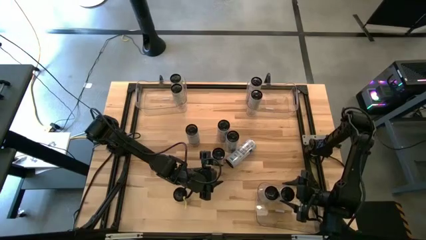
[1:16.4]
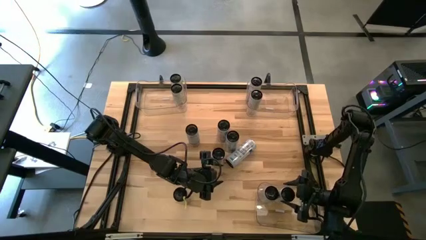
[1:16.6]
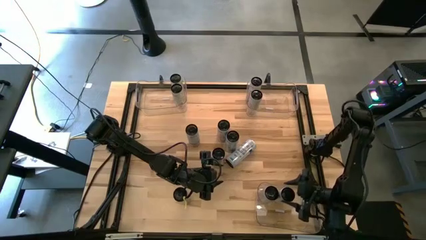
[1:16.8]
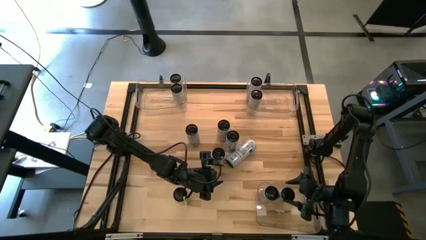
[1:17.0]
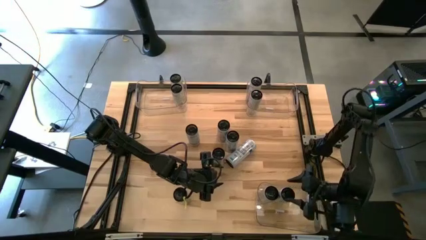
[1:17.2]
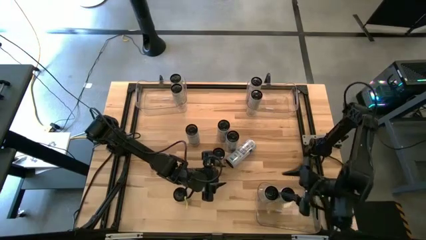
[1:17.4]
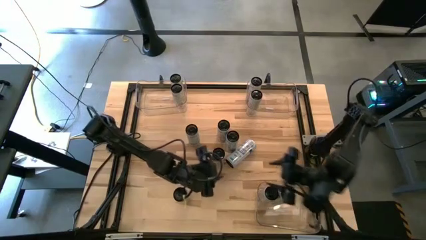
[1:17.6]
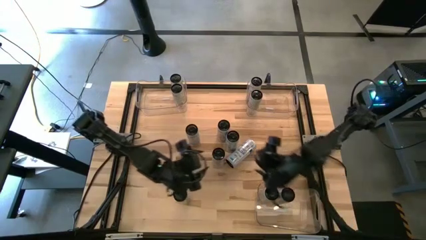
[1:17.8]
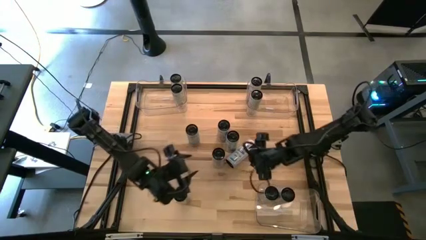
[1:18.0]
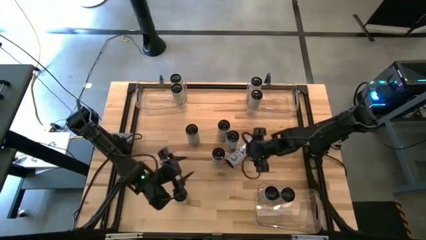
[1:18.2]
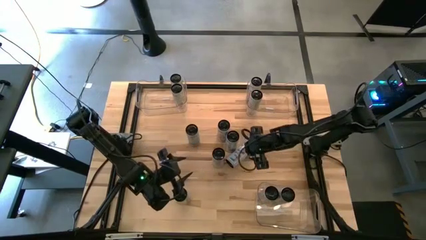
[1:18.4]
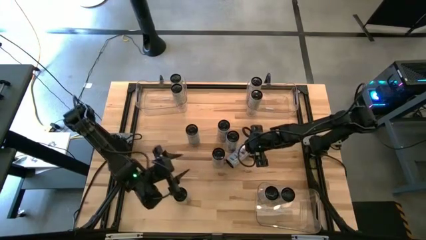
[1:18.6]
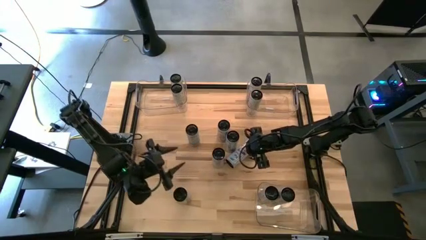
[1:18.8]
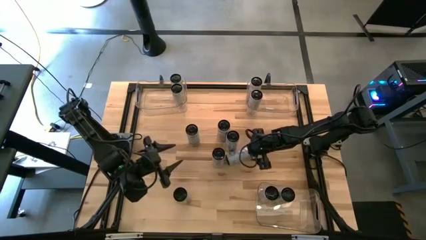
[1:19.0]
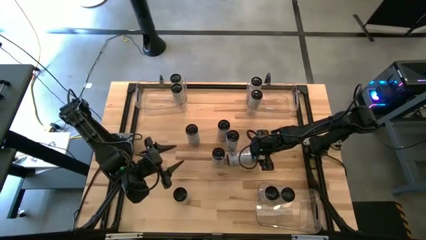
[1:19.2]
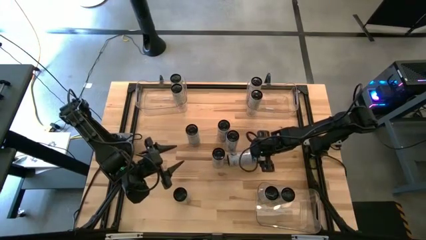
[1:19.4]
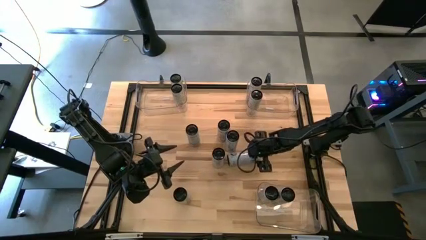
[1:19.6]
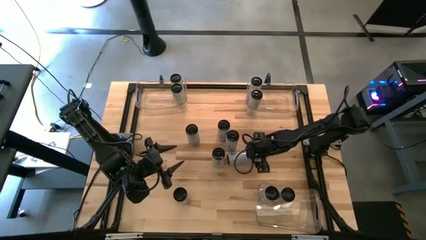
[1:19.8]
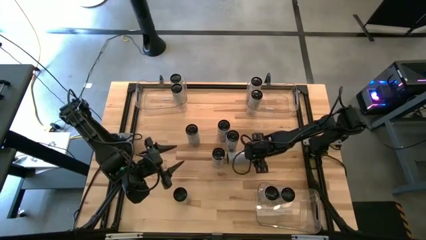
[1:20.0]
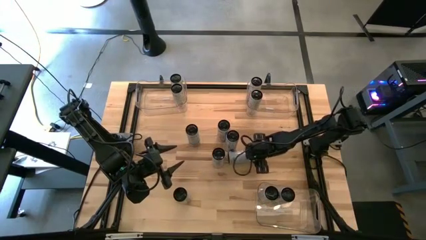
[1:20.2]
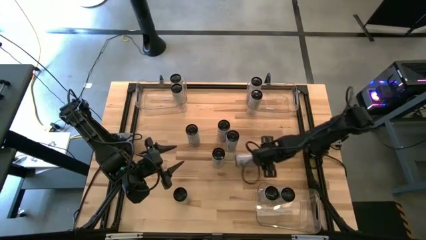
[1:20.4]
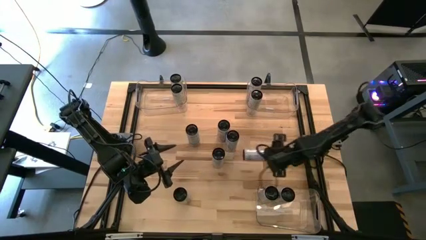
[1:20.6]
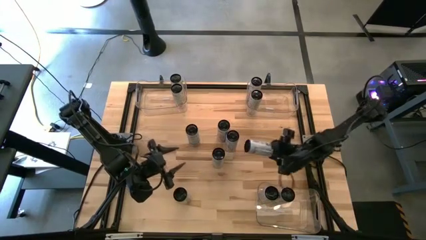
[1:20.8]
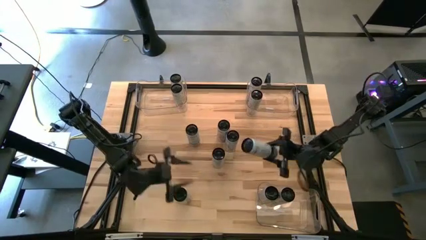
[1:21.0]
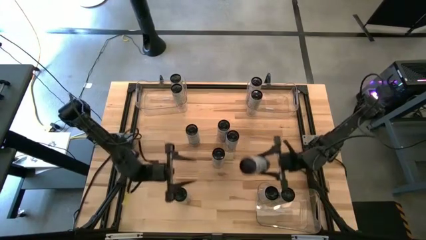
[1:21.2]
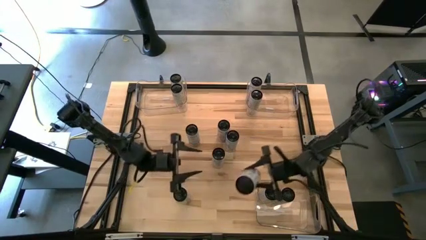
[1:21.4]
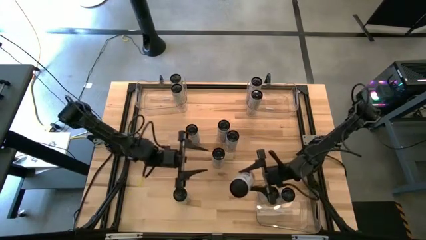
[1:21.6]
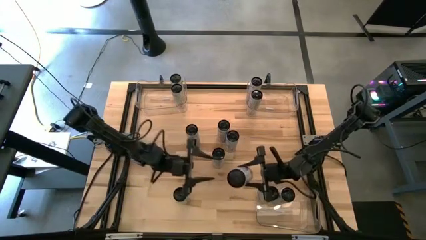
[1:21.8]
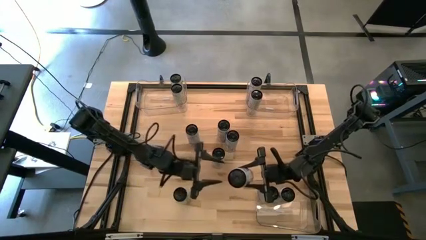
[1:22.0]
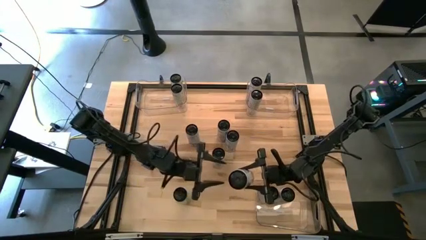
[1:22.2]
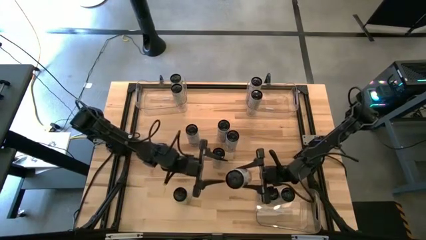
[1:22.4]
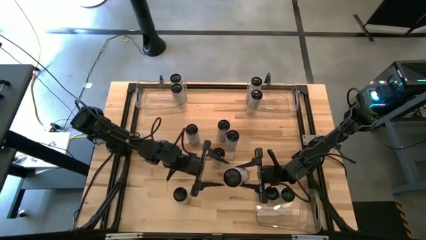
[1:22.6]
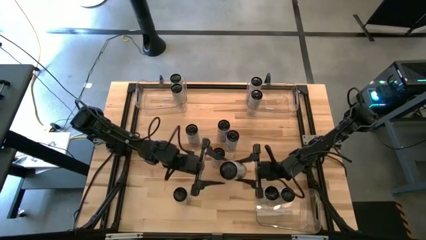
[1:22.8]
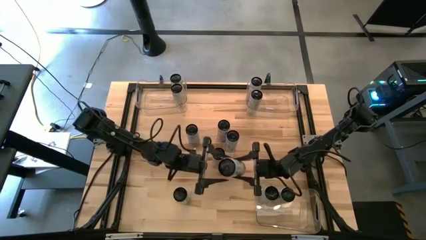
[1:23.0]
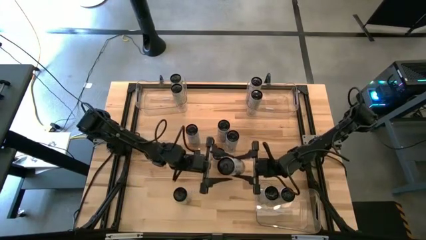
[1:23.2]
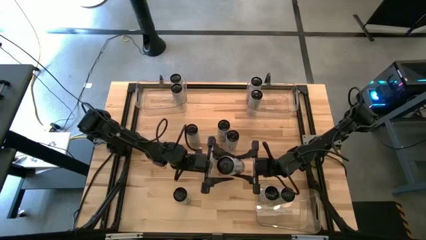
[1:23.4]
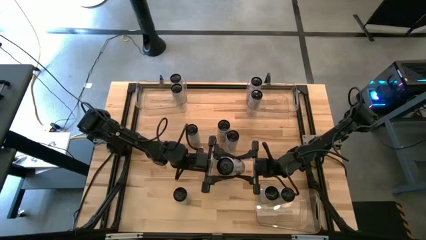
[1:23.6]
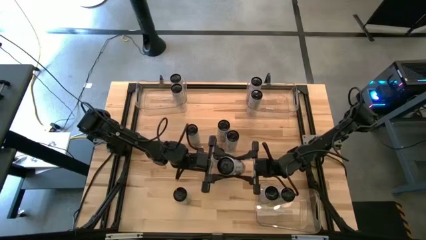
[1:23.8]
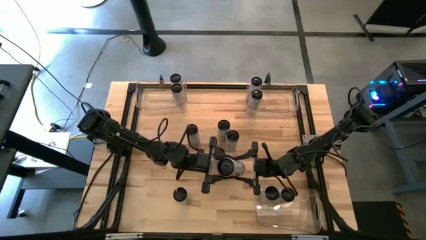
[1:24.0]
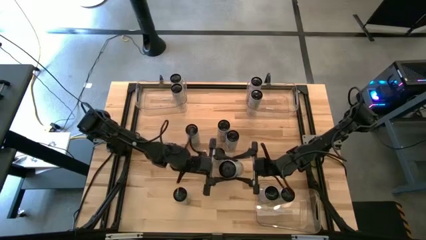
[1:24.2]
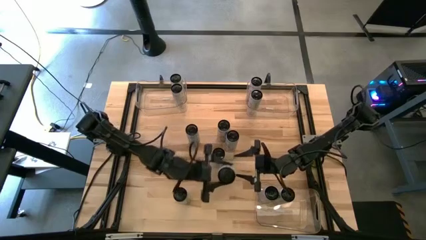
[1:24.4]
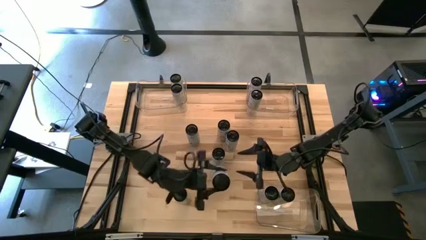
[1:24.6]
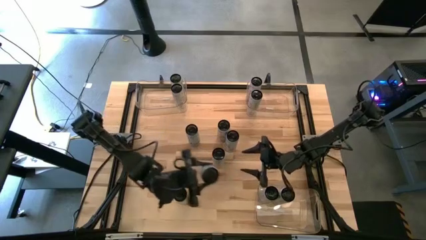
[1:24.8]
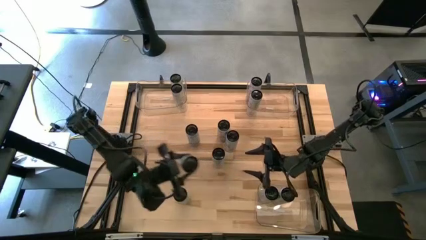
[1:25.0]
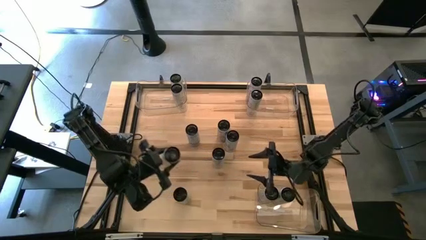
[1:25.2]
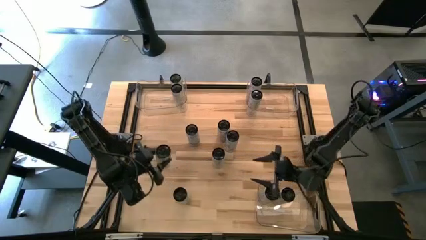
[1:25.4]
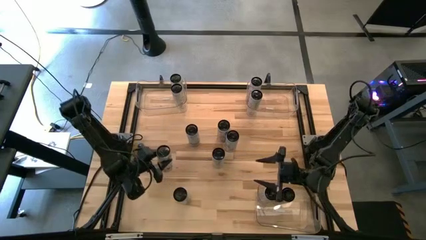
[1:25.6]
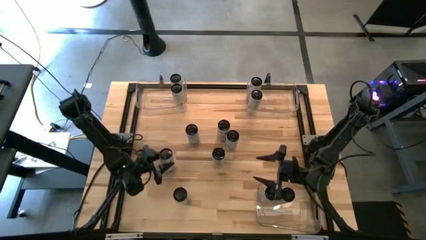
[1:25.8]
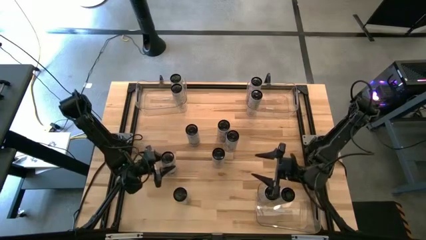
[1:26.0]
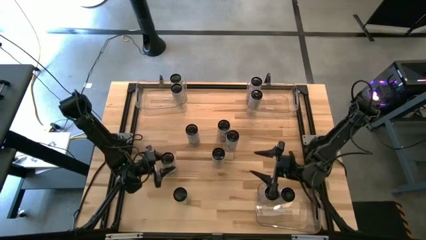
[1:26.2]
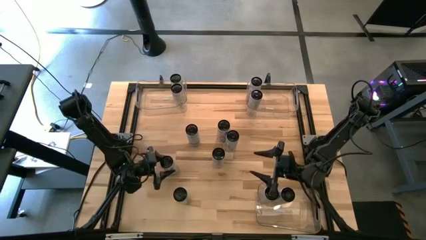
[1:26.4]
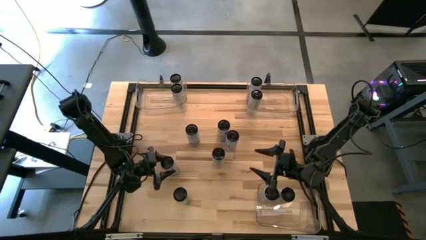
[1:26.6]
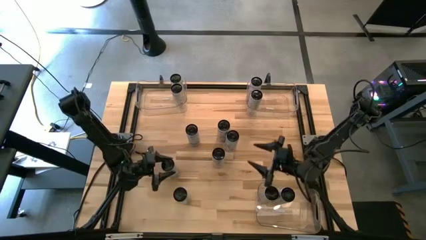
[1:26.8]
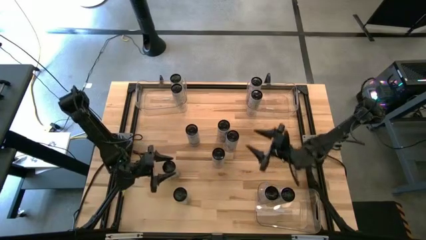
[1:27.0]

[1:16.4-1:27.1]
Task: Sort soda cans
Move the white-blue soda can to the middle left on the table

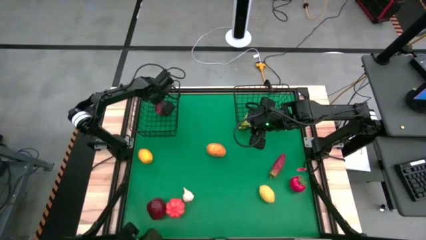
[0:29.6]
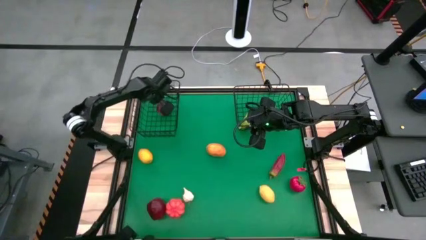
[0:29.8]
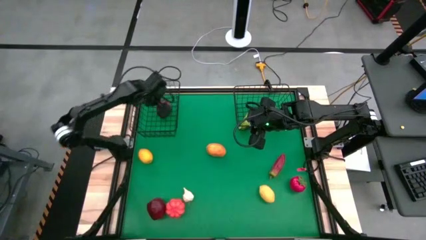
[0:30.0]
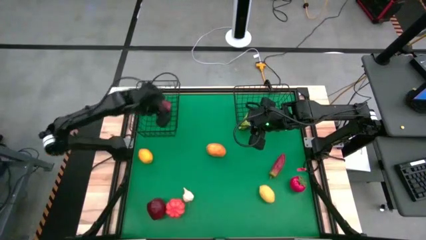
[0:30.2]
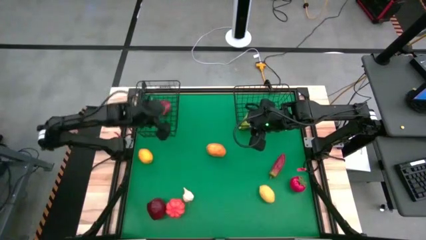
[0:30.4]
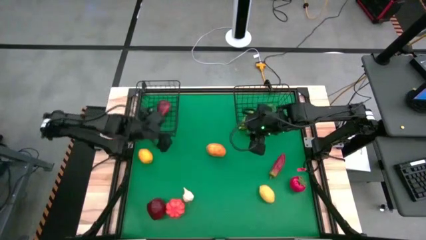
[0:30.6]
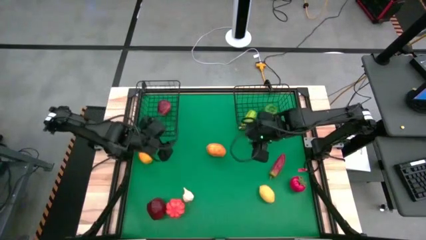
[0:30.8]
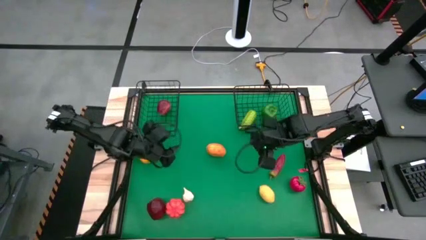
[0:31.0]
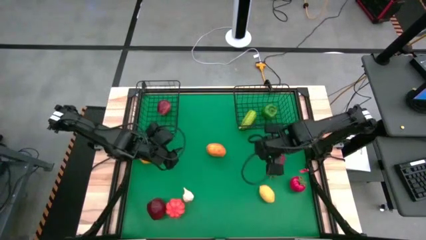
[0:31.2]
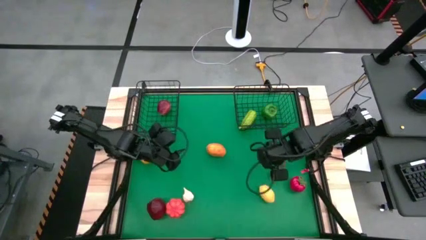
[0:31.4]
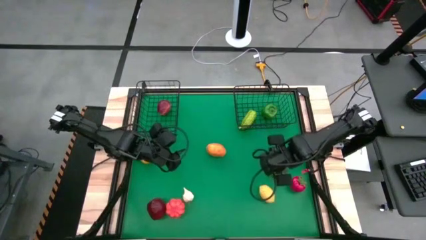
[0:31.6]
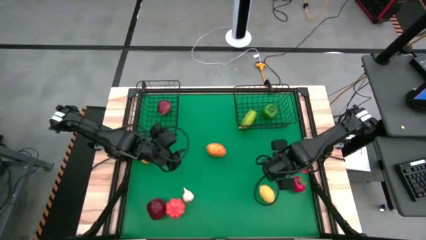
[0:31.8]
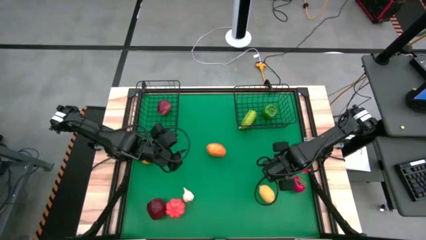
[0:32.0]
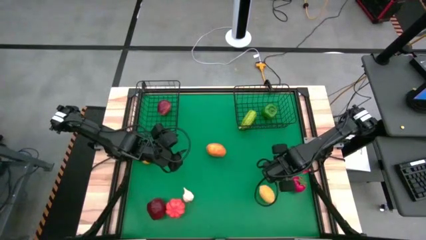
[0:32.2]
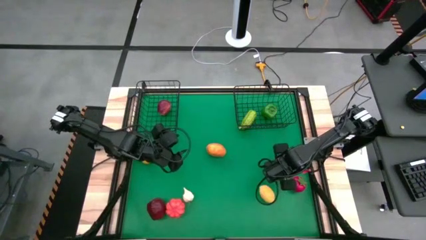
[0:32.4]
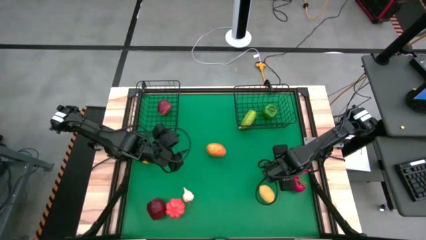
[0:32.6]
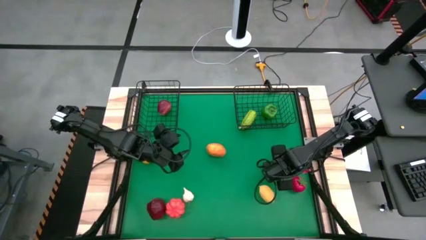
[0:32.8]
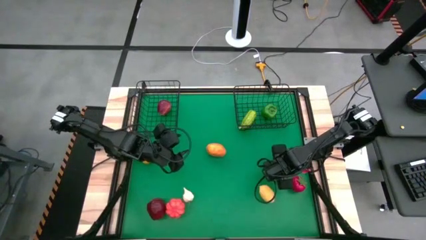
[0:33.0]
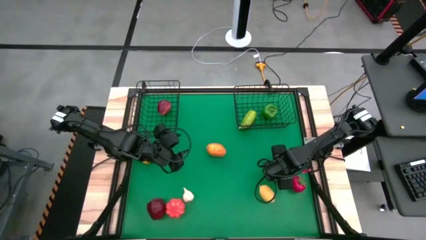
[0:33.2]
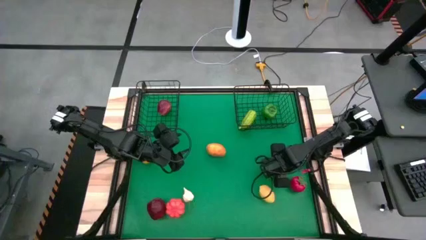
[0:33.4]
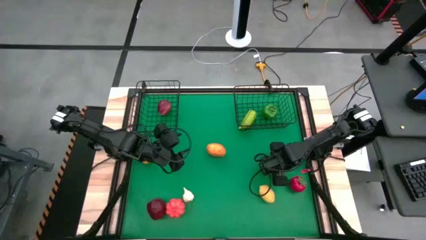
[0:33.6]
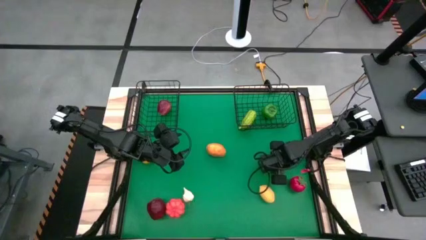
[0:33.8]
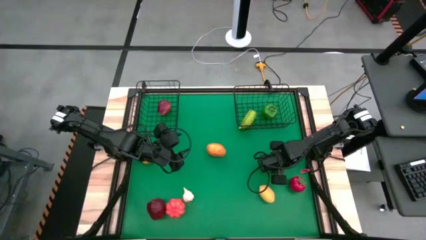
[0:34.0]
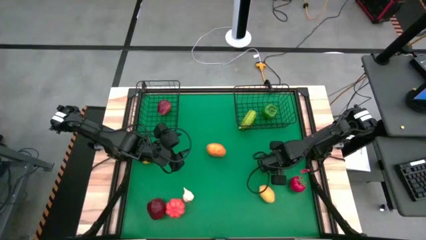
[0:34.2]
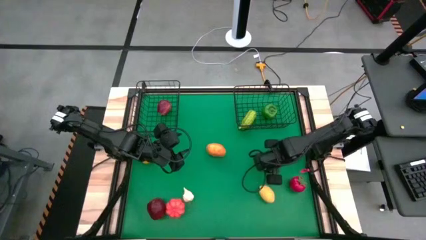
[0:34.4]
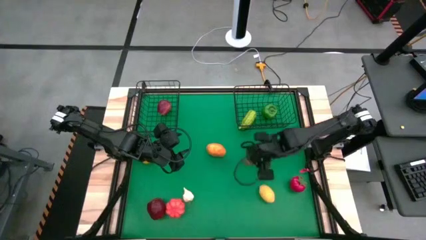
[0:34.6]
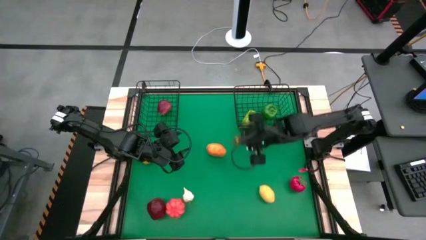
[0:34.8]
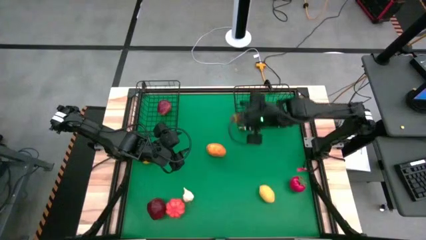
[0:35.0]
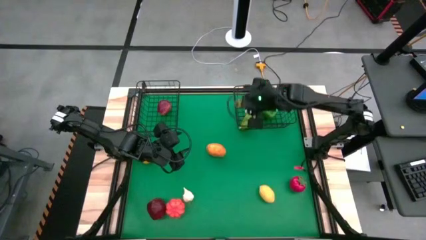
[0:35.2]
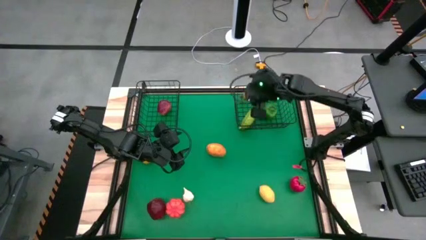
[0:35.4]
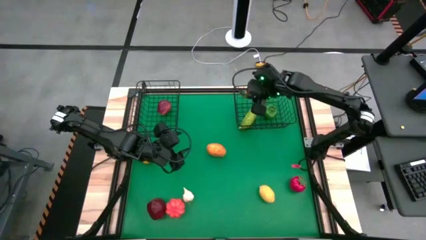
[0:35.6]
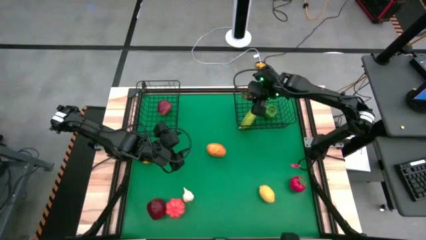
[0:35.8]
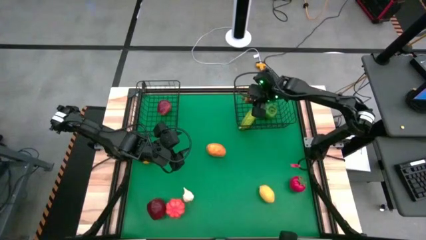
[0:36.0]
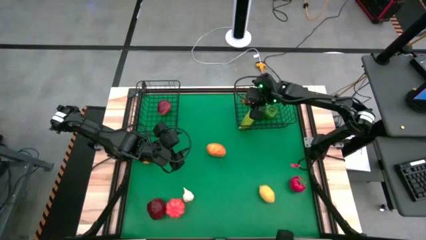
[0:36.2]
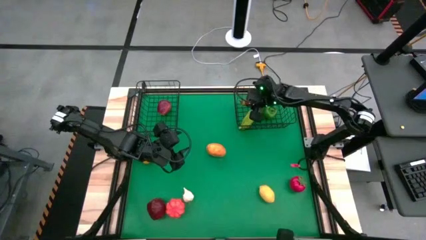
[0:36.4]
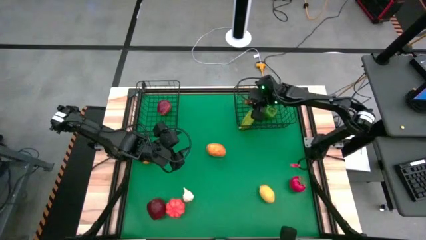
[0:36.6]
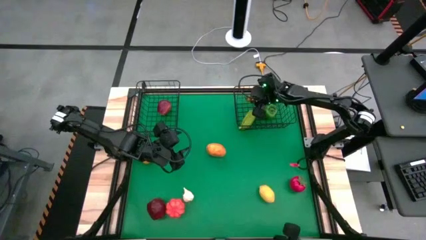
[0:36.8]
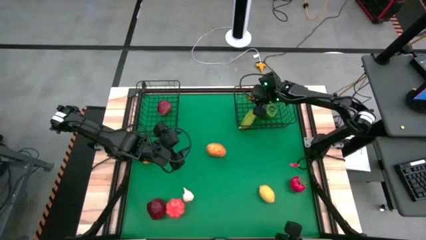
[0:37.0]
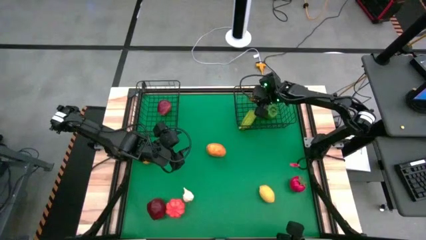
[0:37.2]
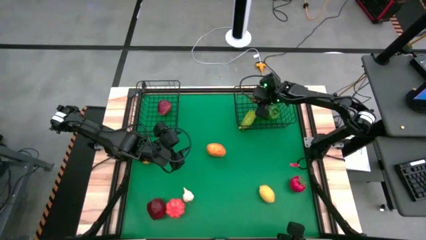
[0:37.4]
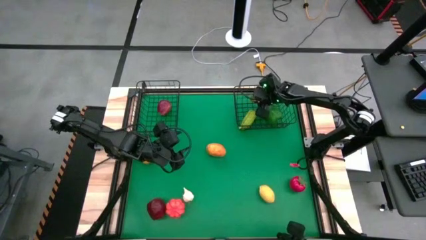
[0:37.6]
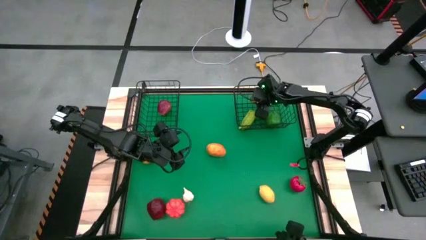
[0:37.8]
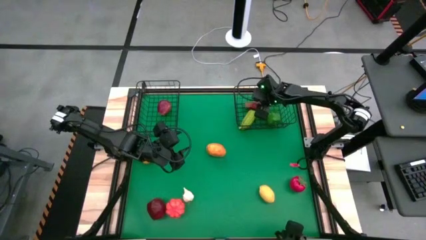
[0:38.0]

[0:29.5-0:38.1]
Task: Sort produce into baskets
Put the red chili pepper into the right wire basket
